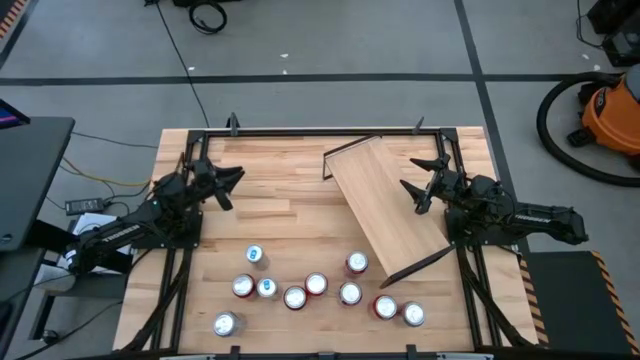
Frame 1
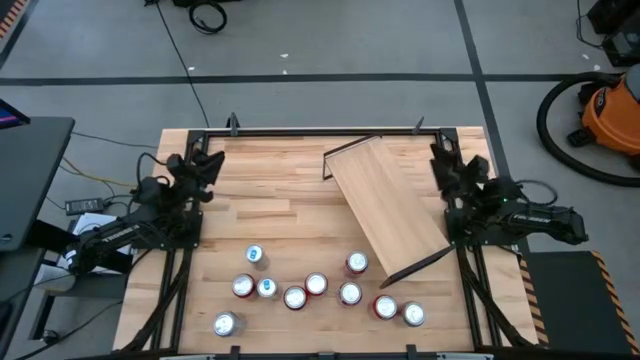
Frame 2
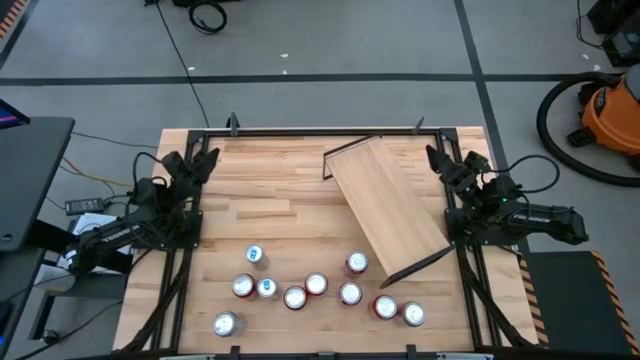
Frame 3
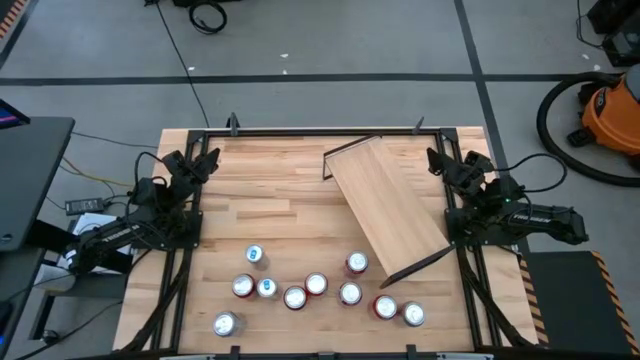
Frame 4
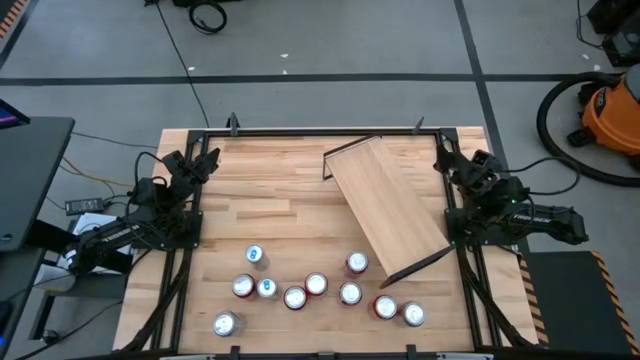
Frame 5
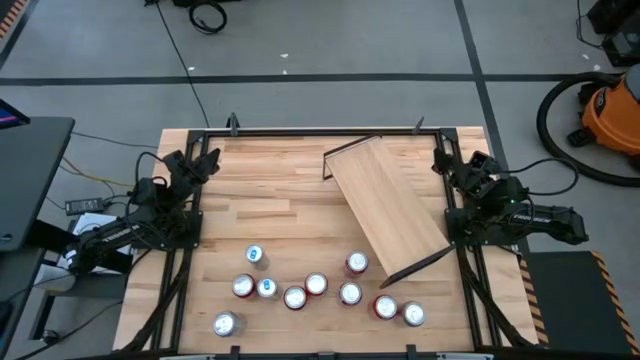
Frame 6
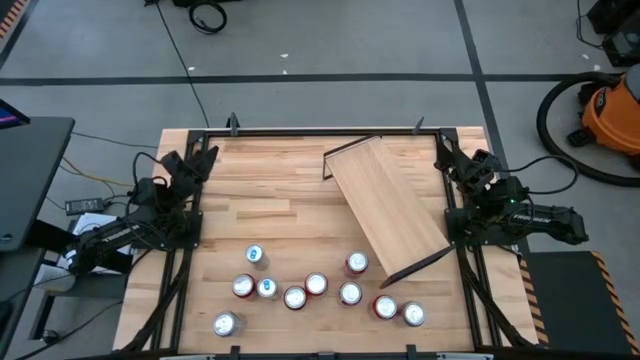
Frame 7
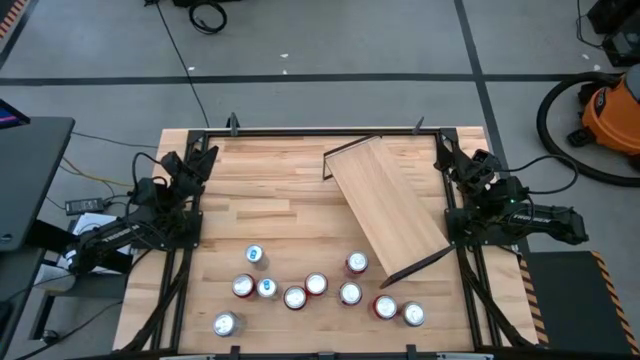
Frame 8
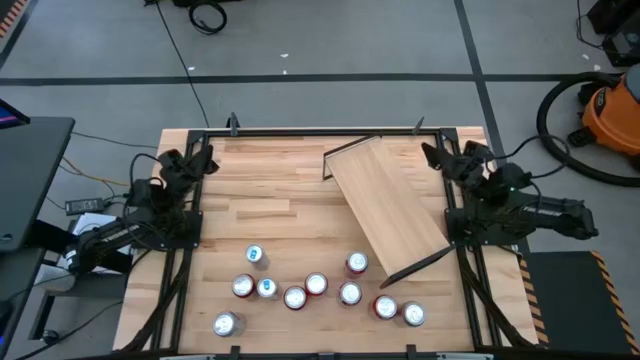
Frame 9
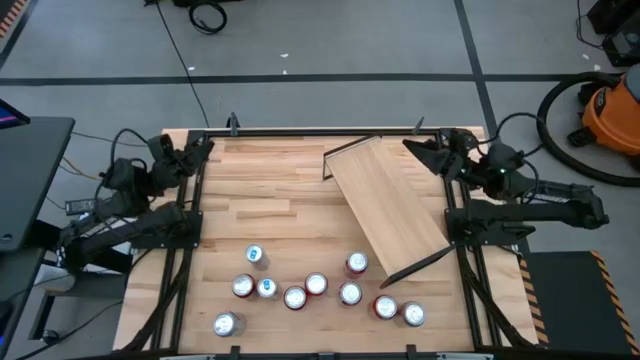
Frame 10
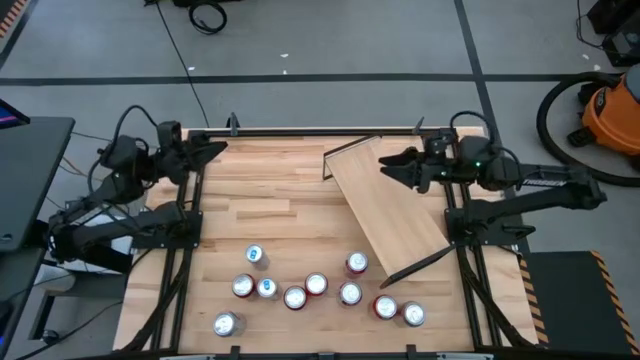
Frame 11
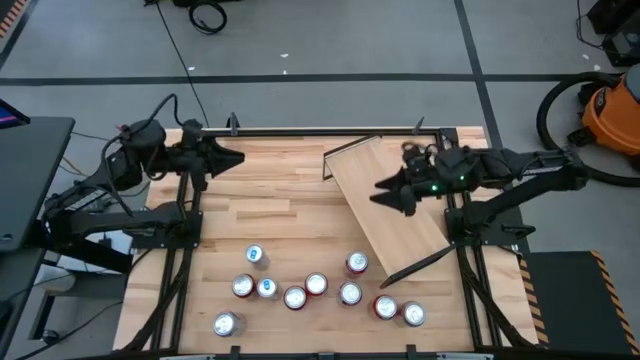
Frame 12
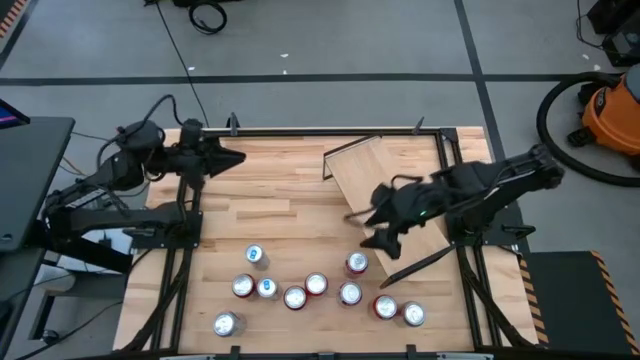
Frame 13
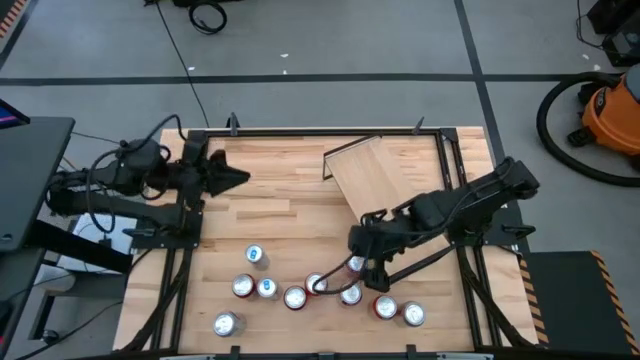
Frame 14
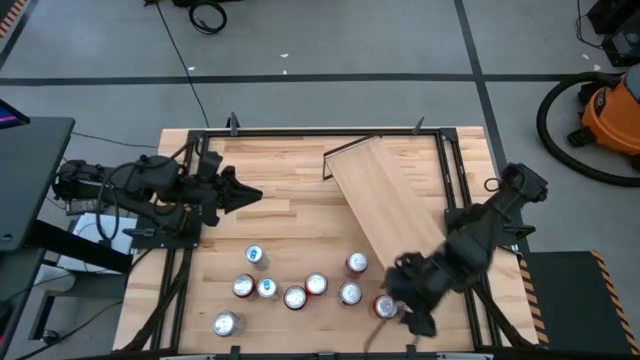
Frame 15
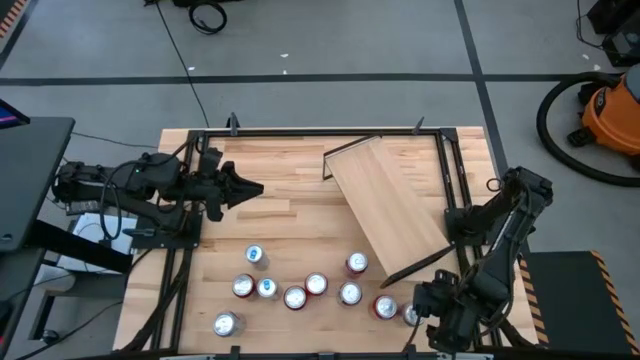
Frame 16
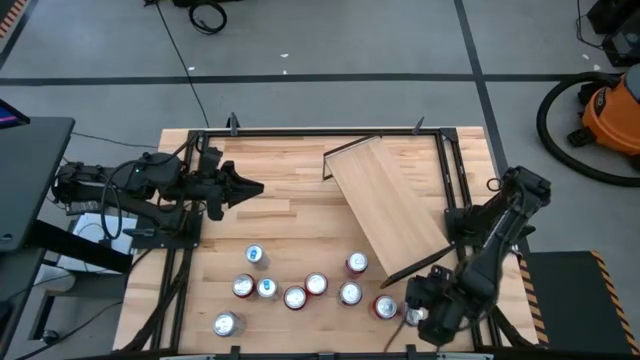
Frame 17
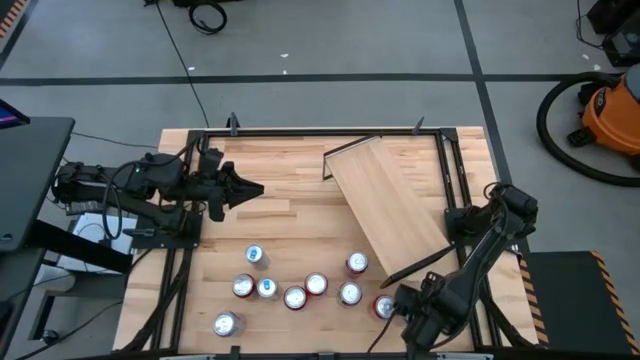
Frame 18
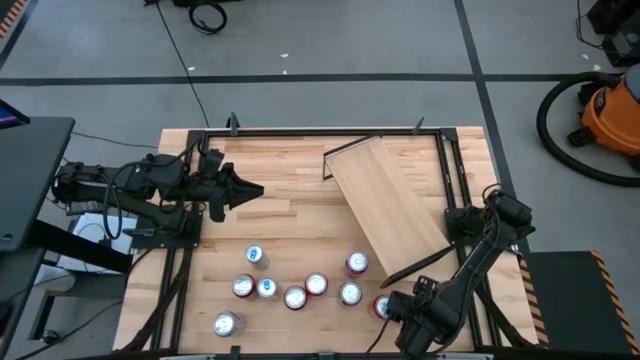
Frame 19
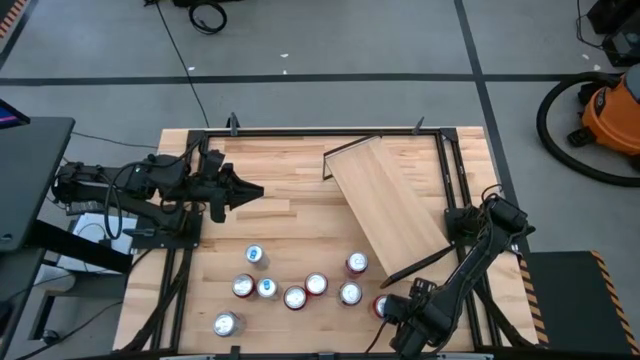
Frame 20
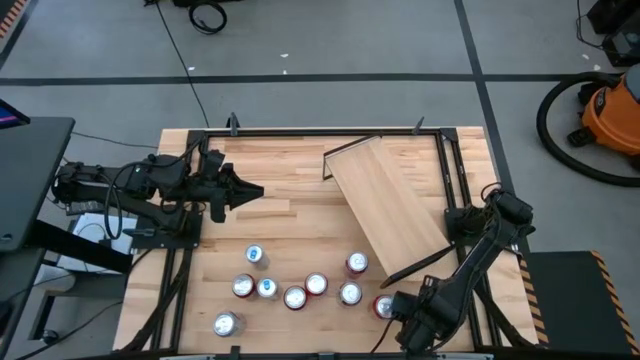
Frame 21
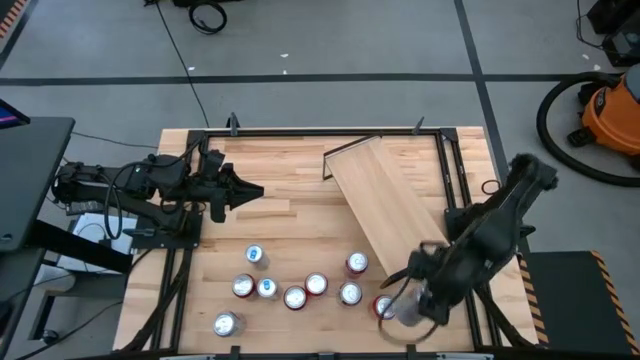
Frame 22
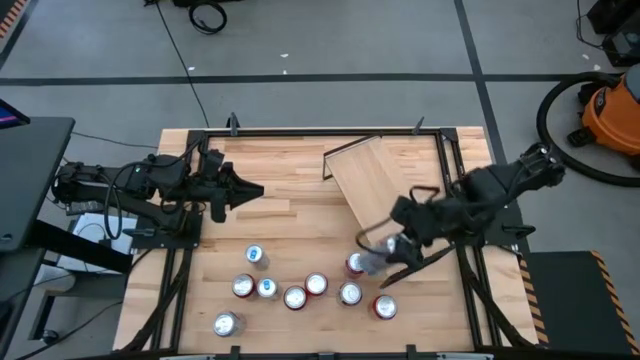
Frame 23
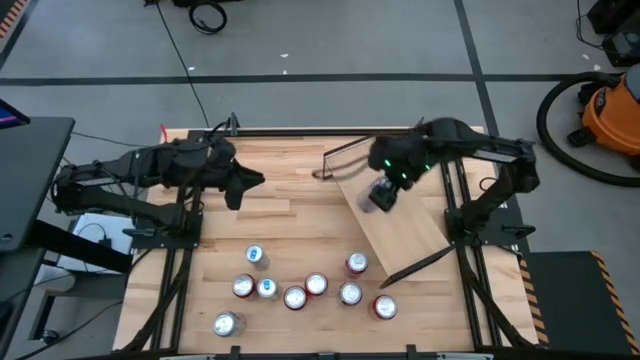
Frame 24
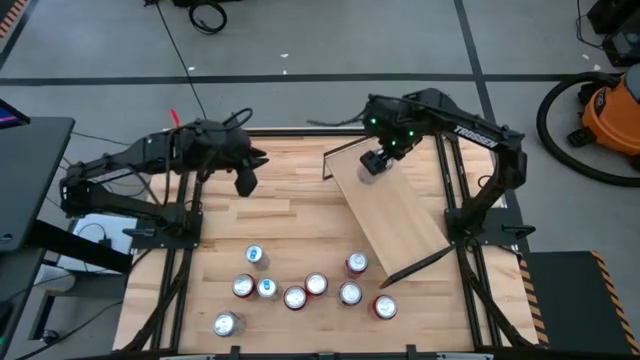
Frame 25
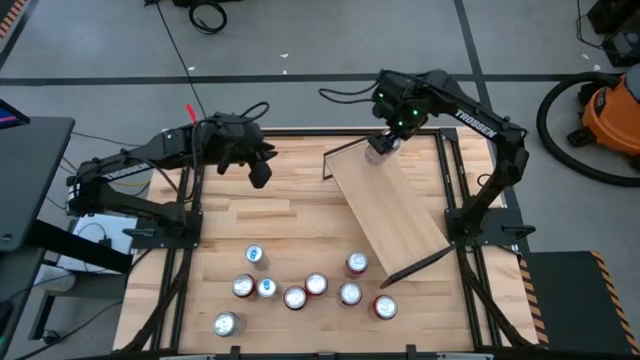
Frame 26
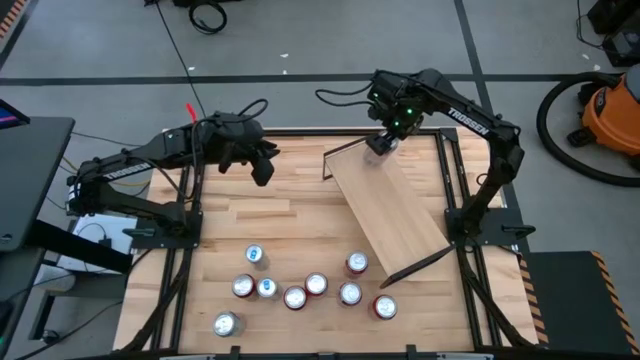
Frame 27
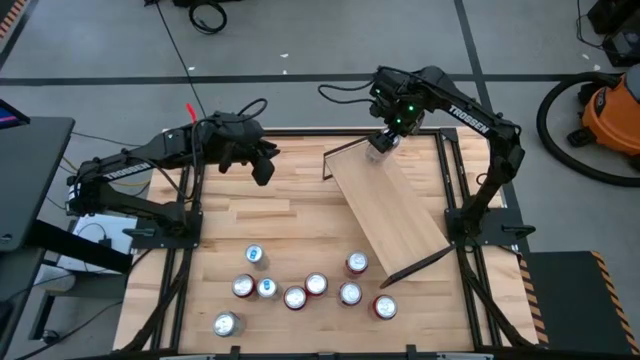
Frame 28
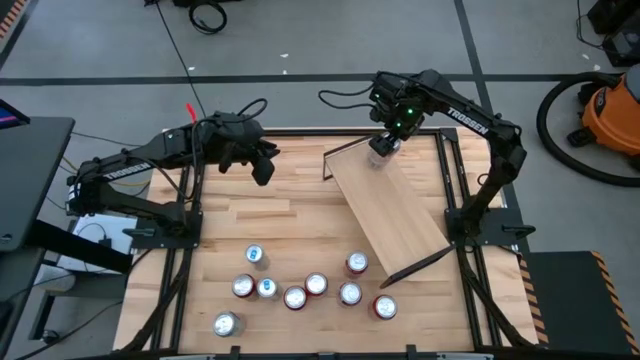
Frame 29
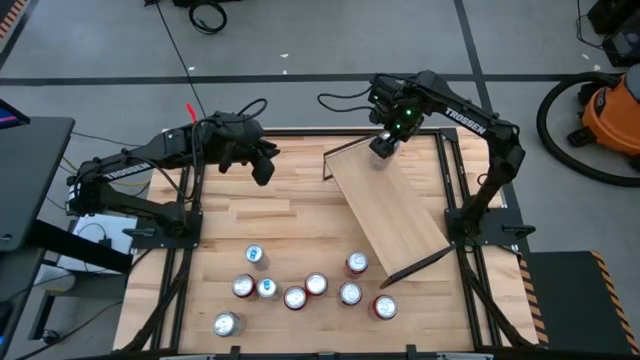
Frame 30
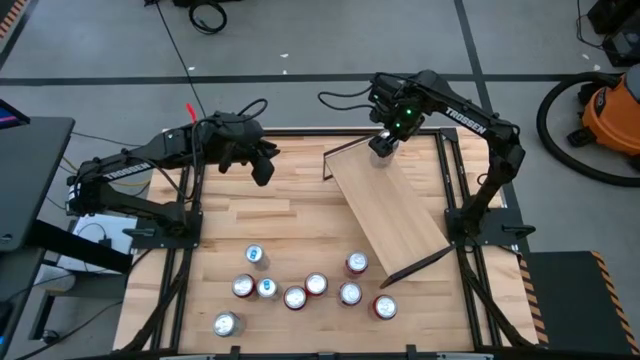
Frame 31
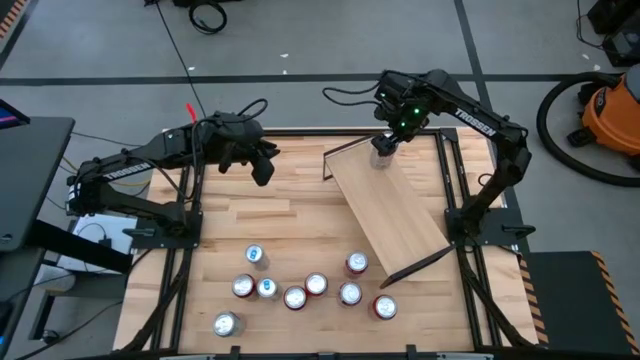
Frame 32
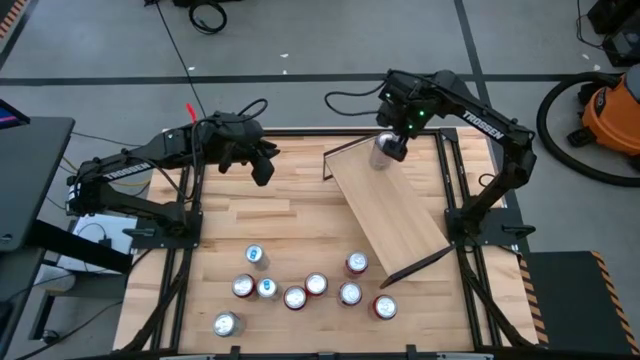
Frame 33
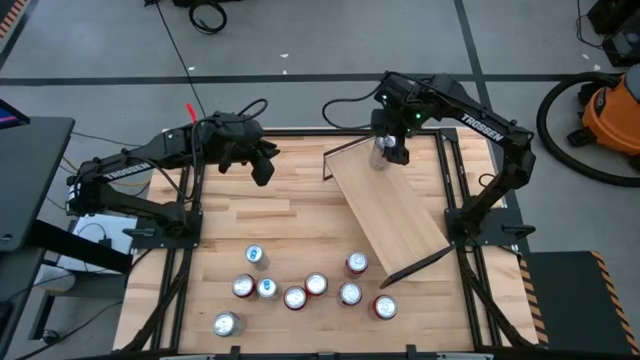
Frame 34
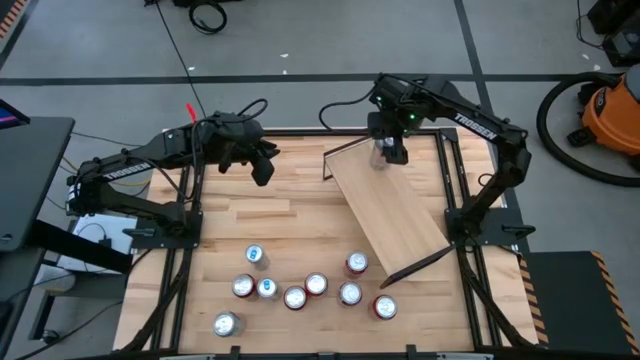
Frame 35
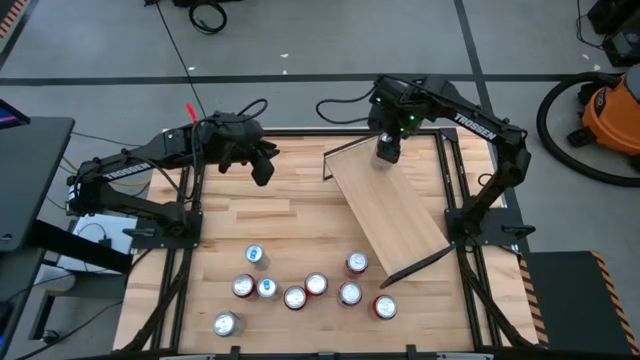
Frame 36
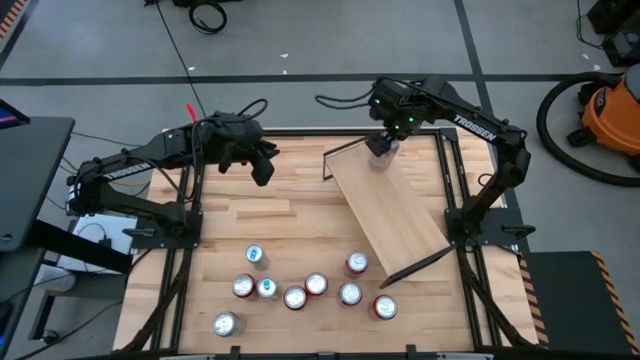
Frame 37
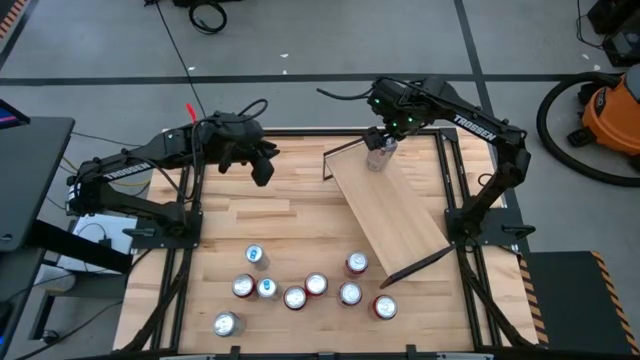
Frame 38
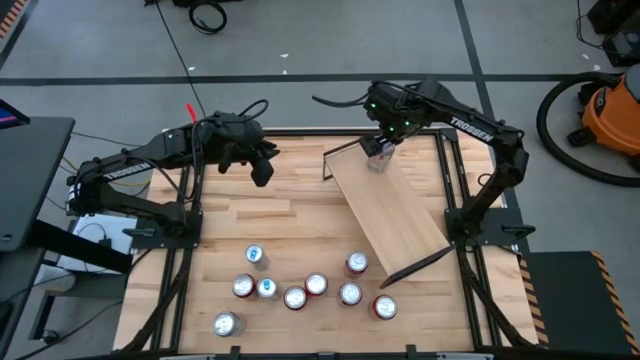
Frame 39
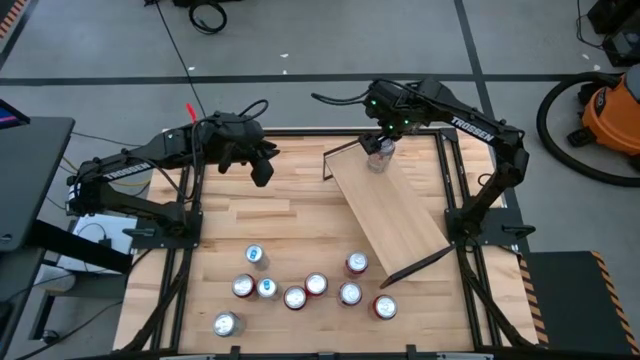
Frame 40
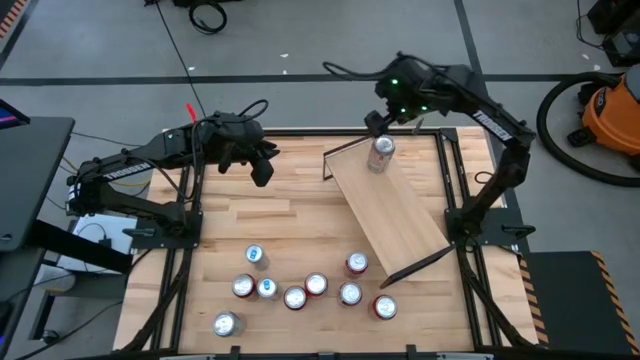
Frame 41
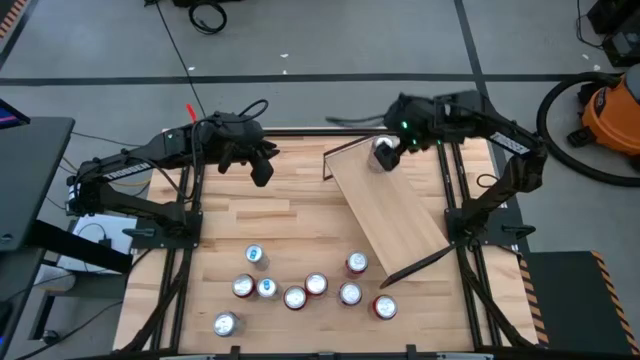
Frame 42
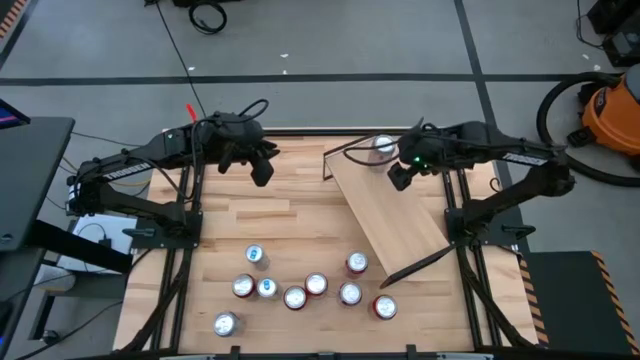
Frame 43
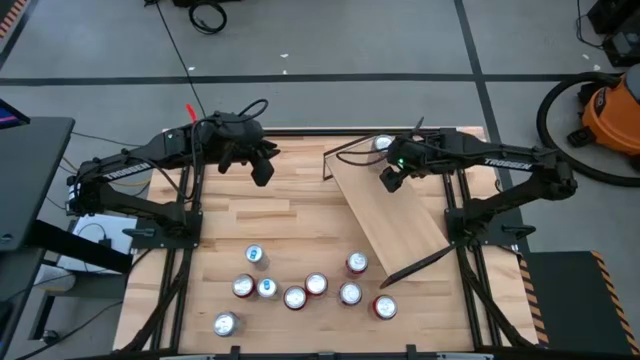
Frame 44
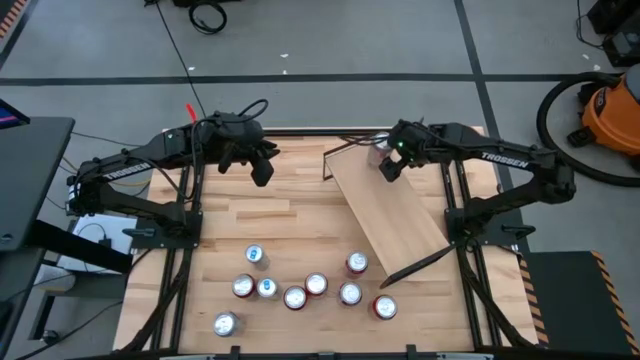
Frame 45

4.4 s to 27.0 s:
Task: Place canned beverage on shelf
Put the right silver soda can on the shelf
